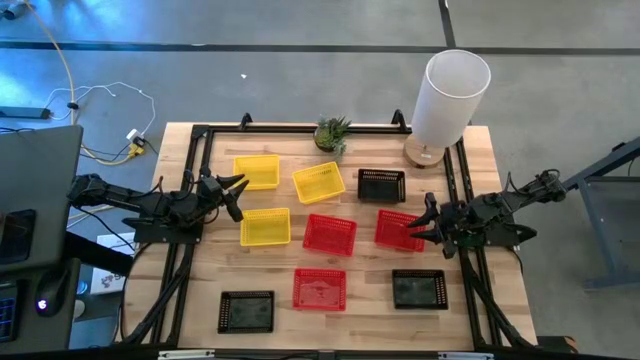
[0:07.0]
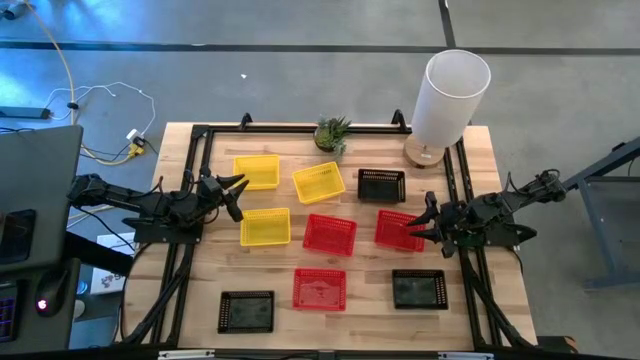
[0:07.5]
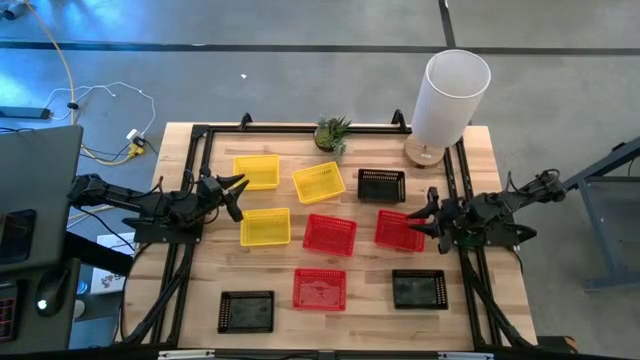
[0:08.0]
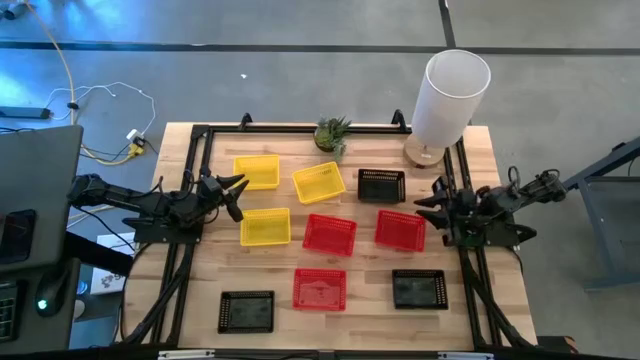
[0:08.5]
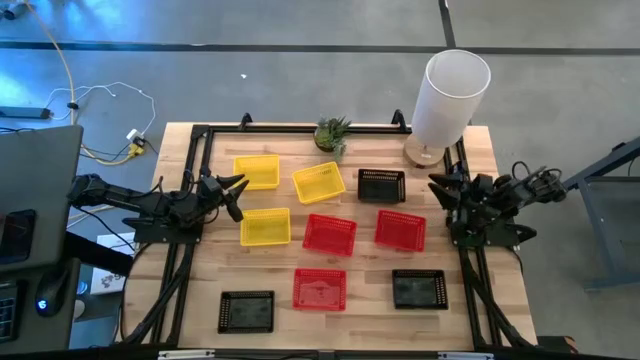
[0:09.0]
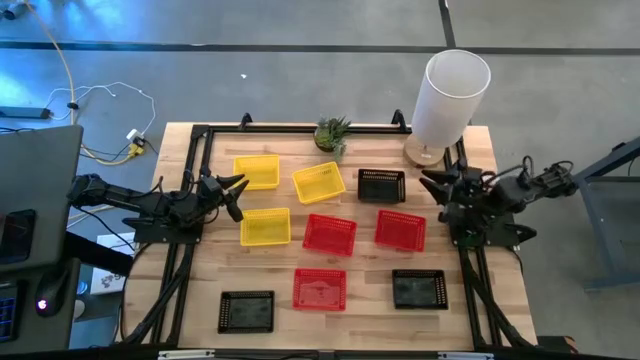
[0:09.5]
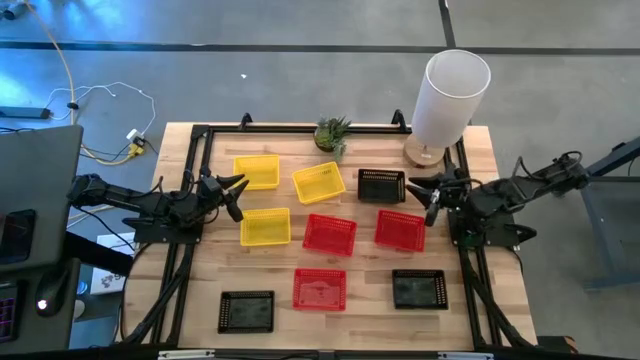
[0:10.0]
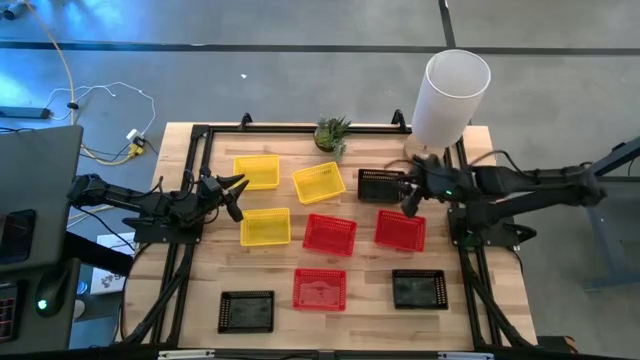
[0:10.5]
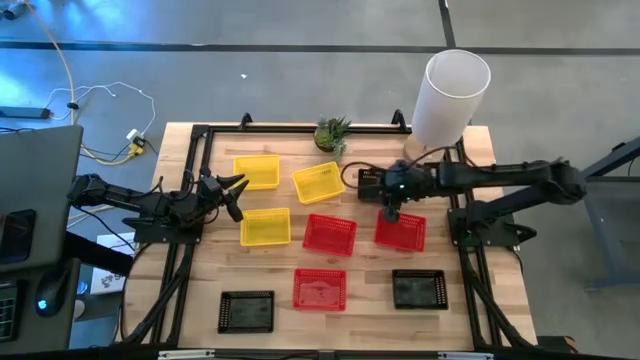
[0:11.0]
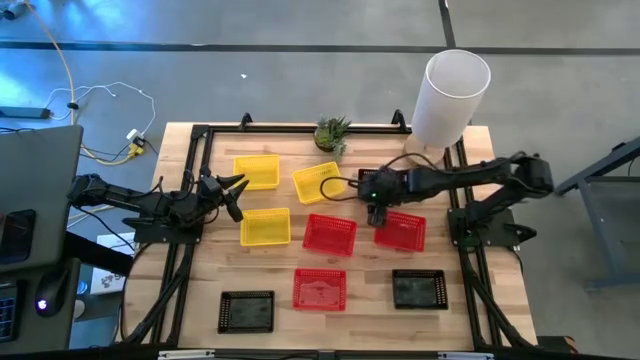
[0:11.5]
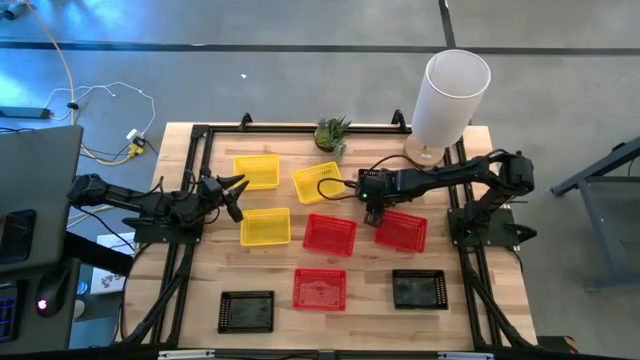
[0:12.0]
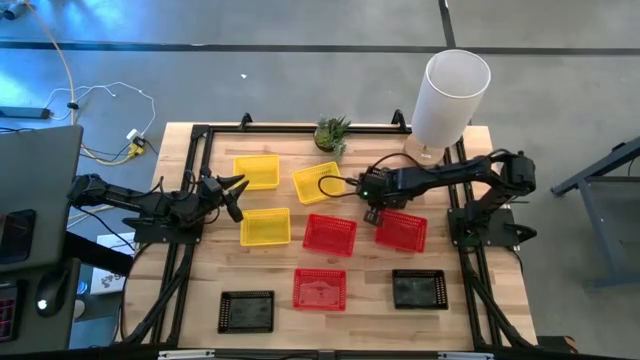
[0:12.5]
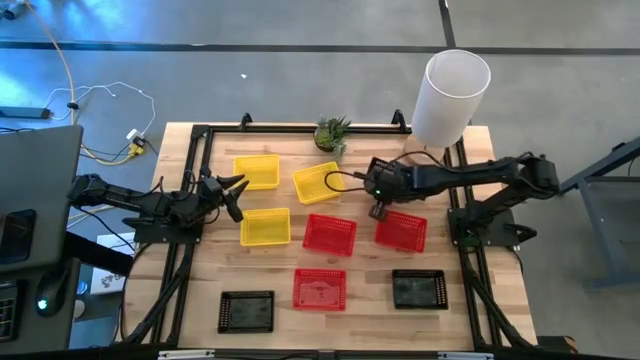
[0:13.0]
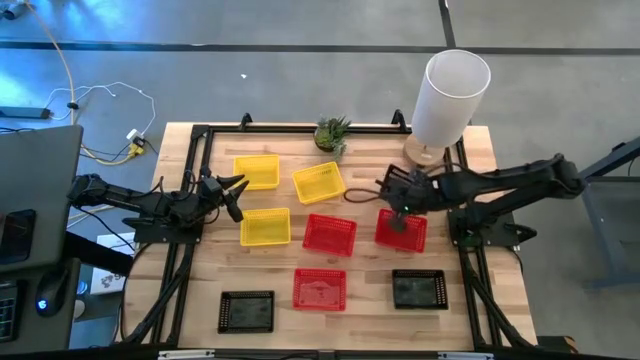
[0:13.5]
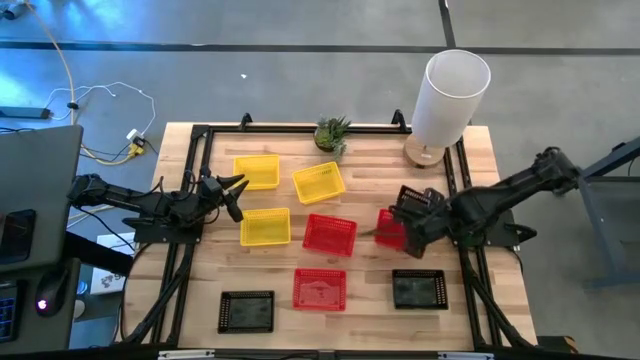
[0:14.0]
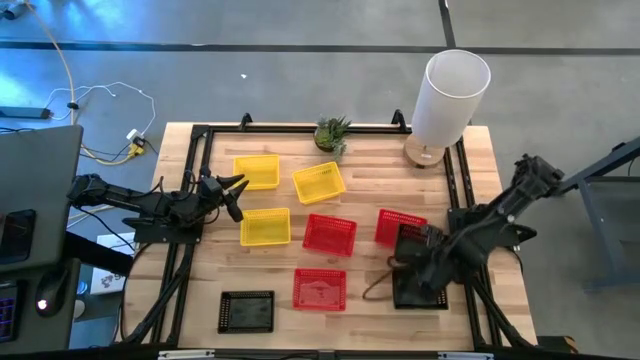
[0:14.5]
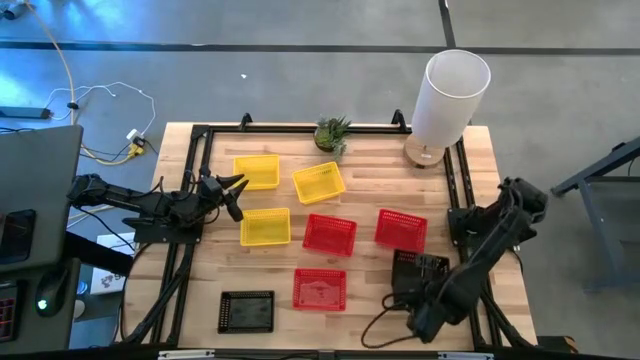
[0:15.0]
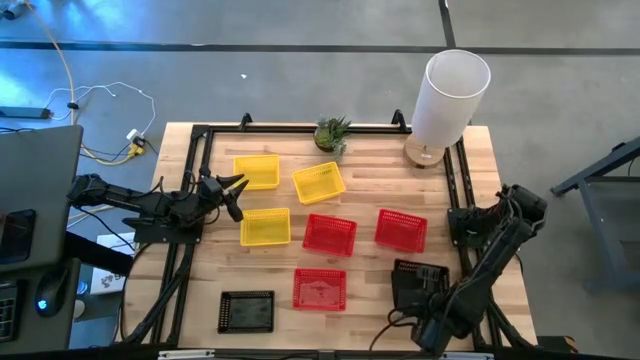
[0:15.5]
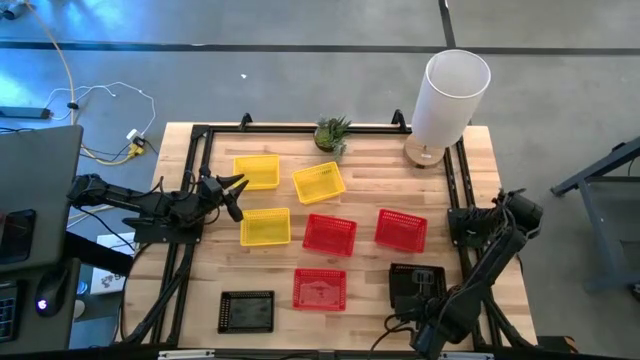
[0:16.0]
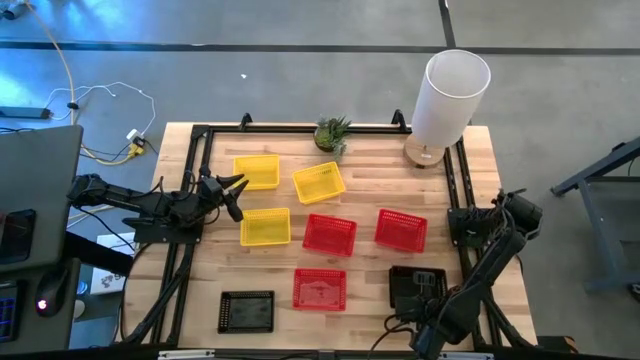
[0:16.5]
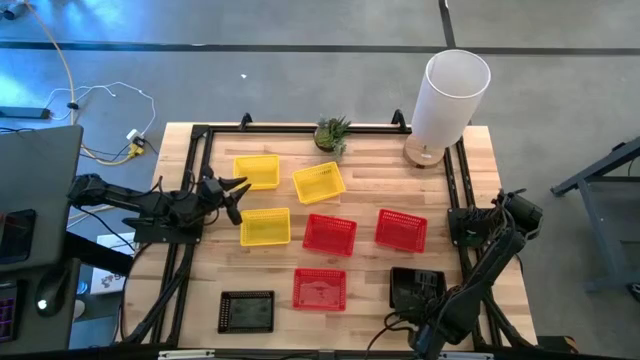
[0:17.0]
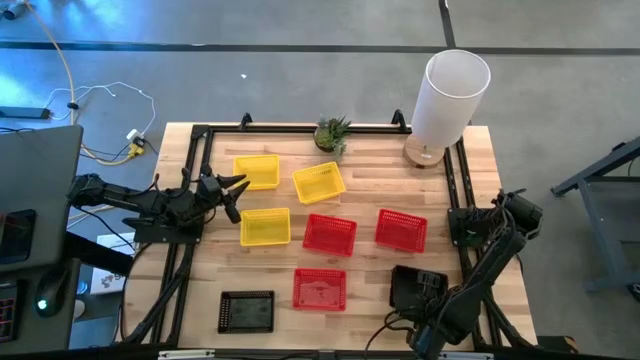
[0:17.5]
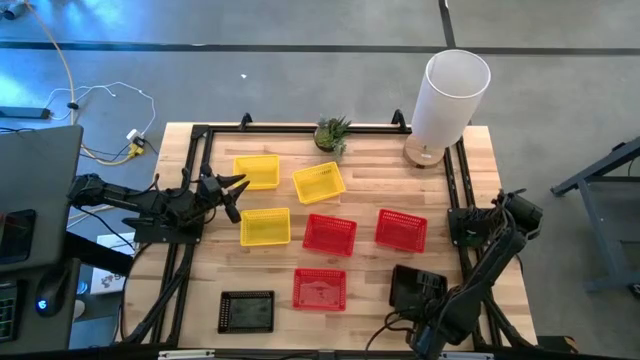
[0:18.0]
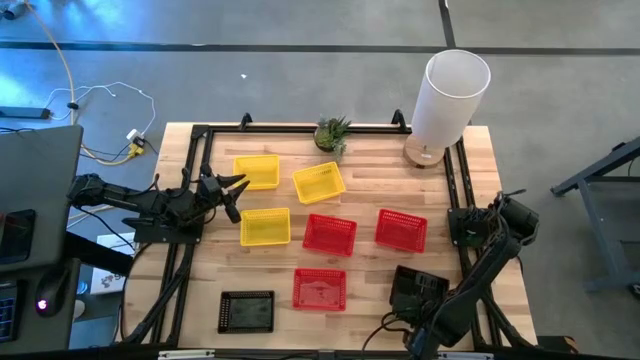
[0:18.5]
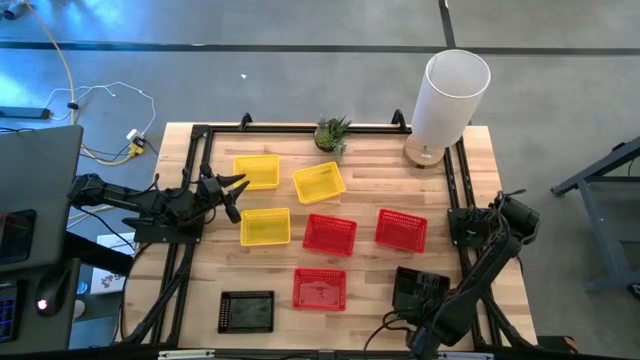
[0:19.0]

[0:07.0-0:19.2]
Stack the top black bin on top of the middle black bin
